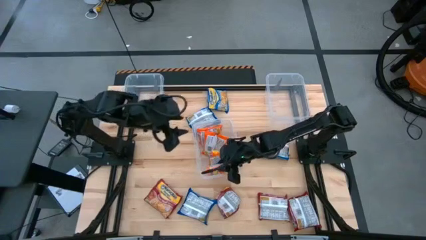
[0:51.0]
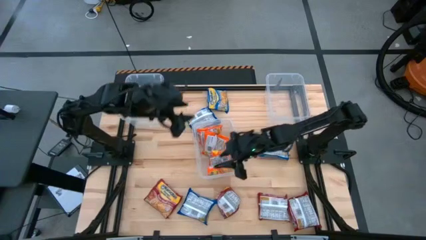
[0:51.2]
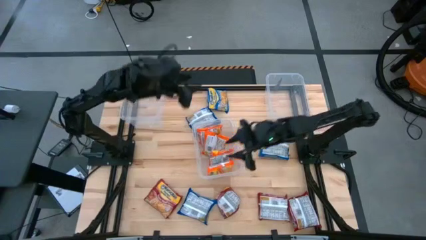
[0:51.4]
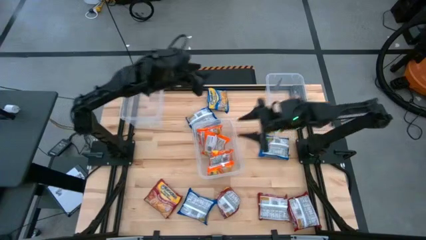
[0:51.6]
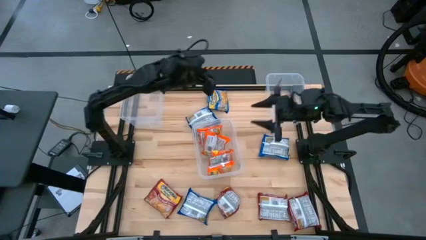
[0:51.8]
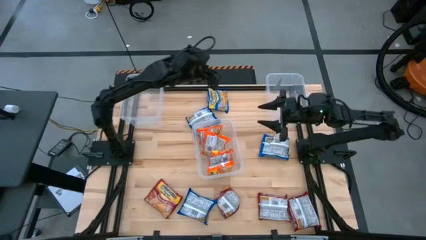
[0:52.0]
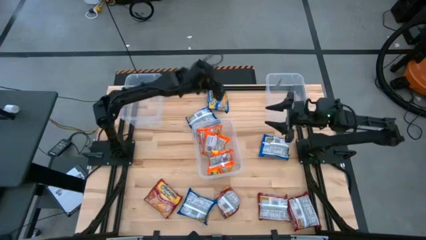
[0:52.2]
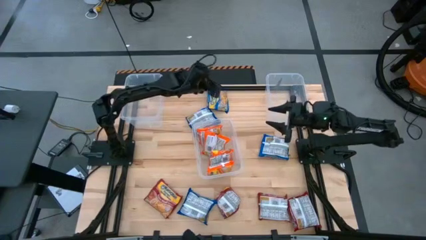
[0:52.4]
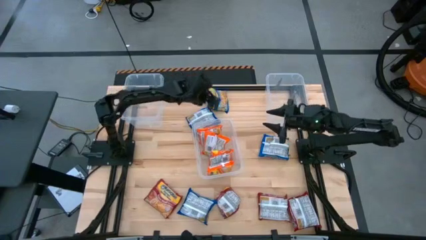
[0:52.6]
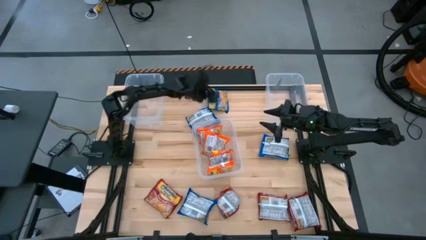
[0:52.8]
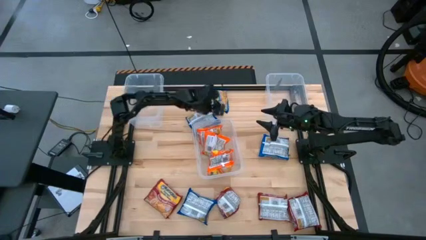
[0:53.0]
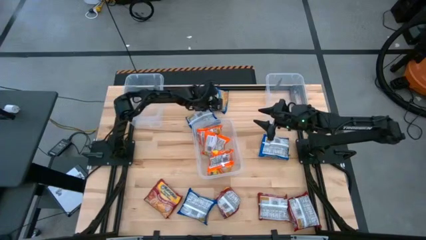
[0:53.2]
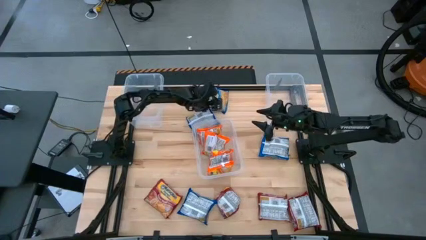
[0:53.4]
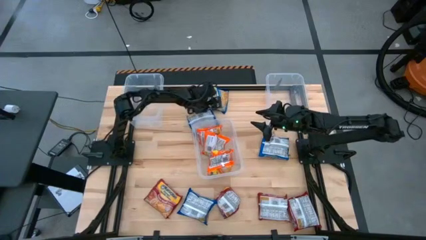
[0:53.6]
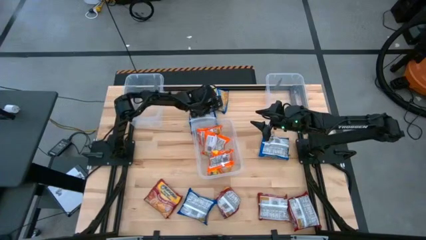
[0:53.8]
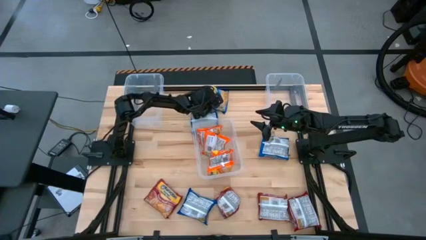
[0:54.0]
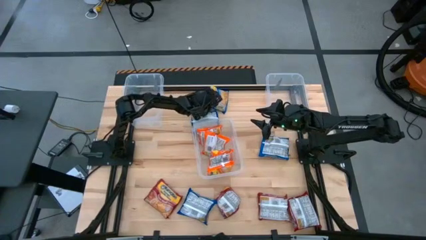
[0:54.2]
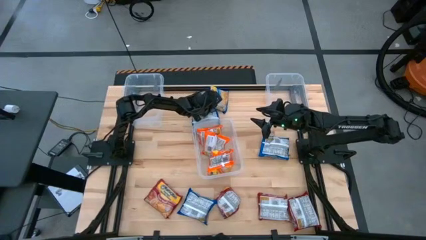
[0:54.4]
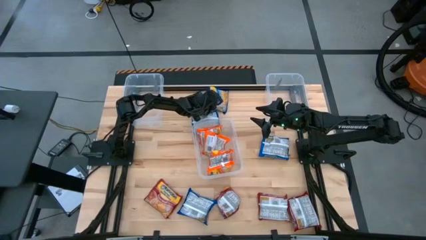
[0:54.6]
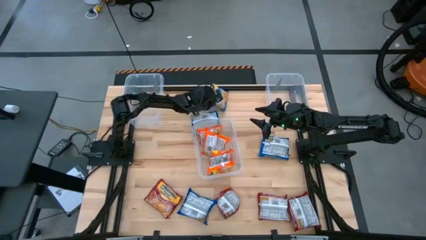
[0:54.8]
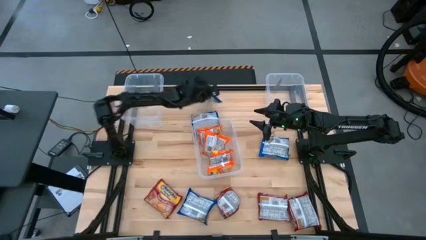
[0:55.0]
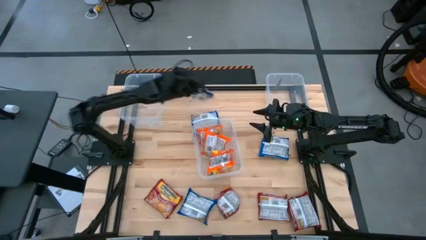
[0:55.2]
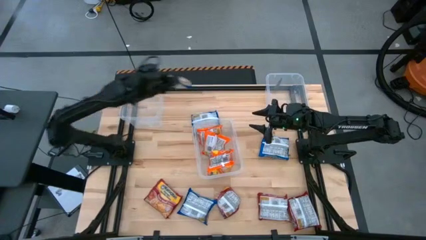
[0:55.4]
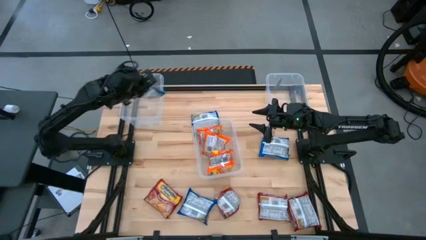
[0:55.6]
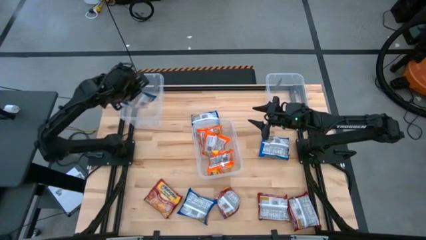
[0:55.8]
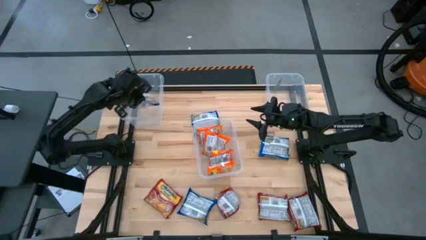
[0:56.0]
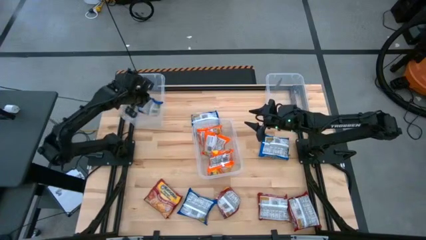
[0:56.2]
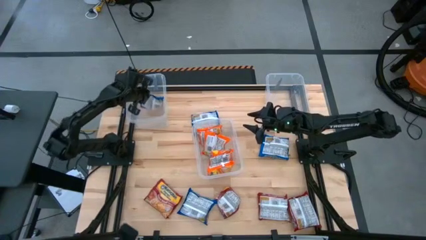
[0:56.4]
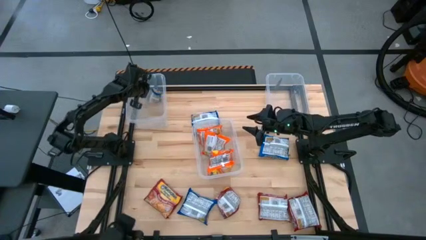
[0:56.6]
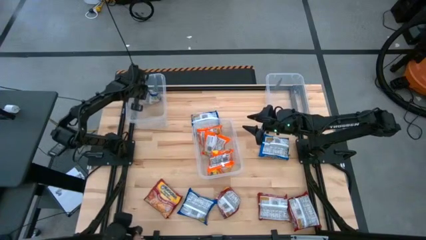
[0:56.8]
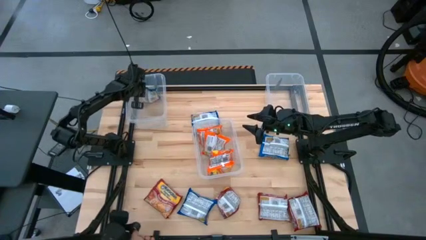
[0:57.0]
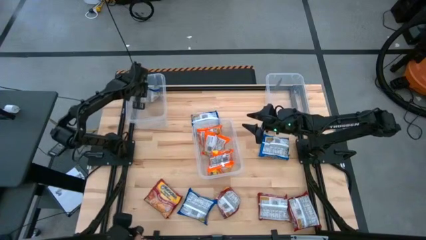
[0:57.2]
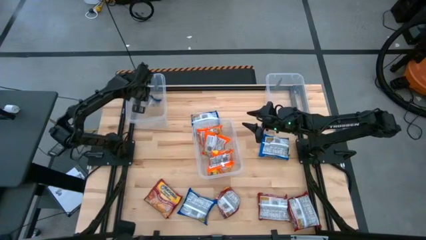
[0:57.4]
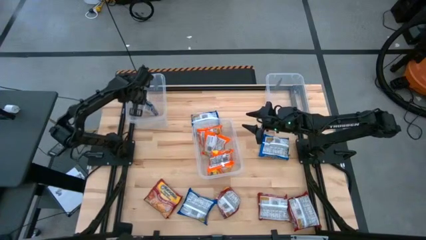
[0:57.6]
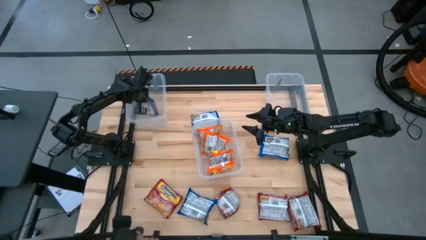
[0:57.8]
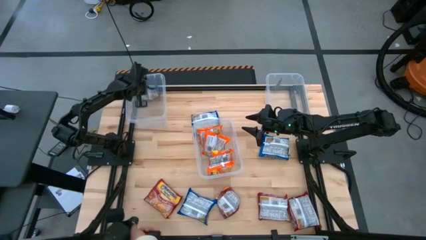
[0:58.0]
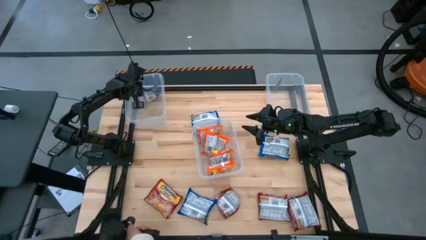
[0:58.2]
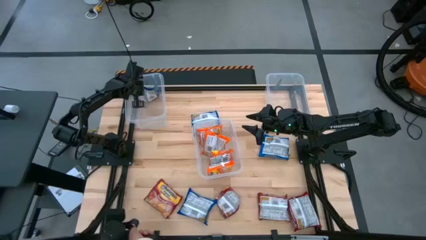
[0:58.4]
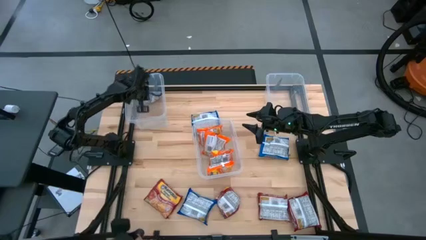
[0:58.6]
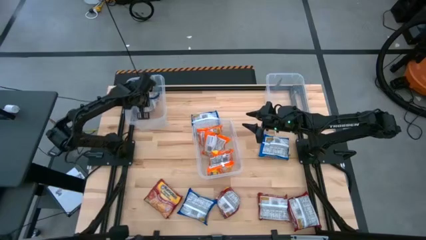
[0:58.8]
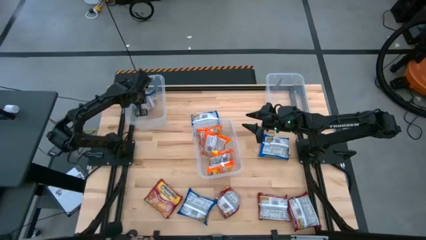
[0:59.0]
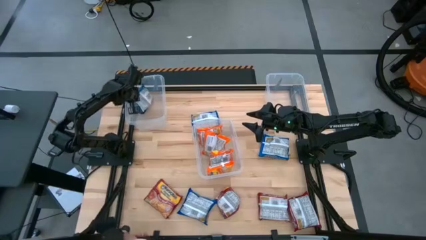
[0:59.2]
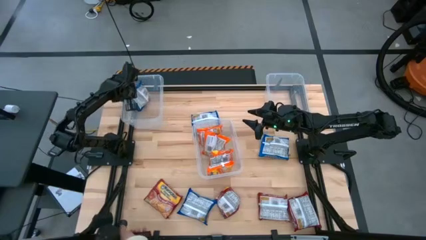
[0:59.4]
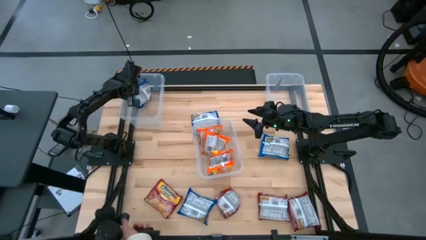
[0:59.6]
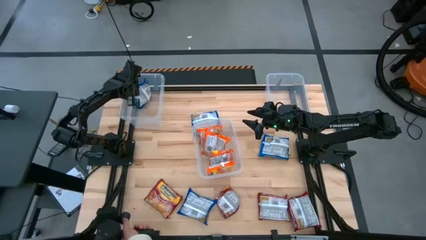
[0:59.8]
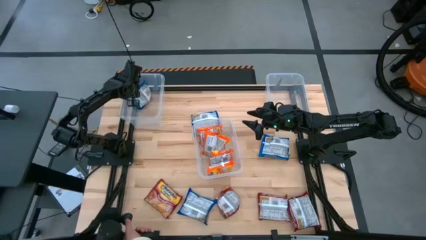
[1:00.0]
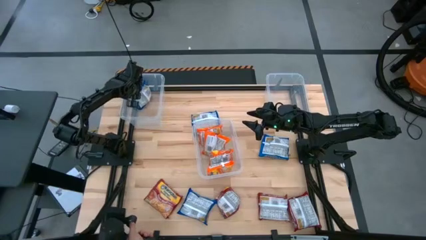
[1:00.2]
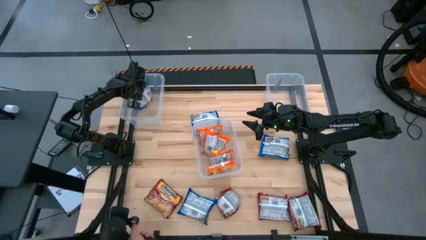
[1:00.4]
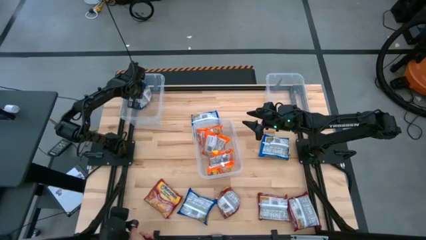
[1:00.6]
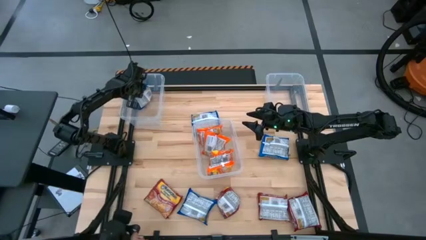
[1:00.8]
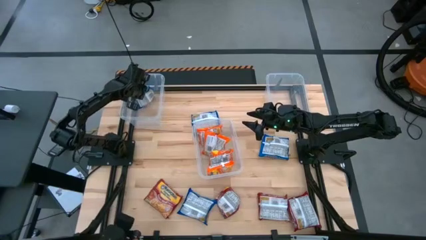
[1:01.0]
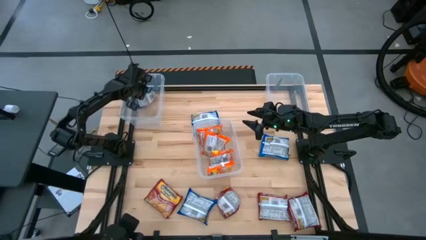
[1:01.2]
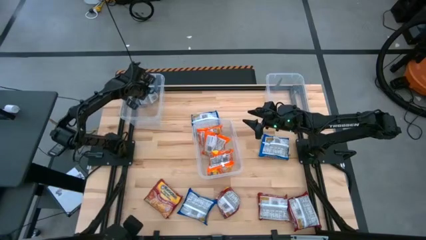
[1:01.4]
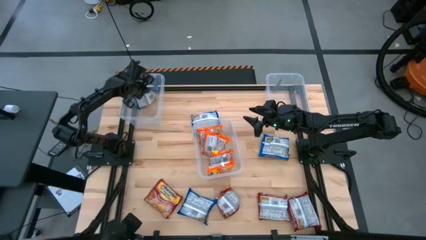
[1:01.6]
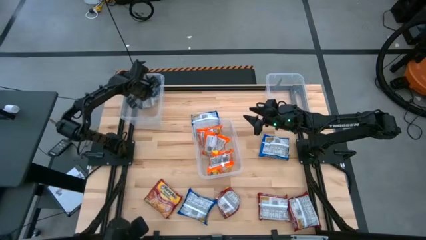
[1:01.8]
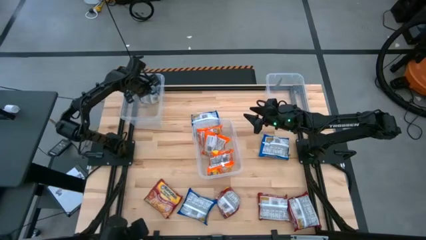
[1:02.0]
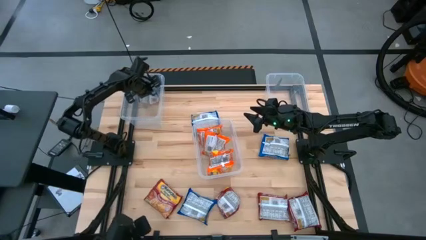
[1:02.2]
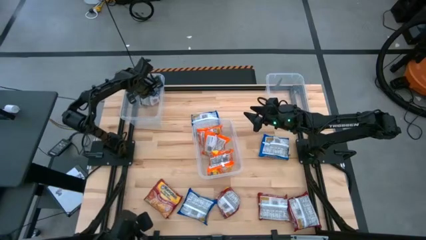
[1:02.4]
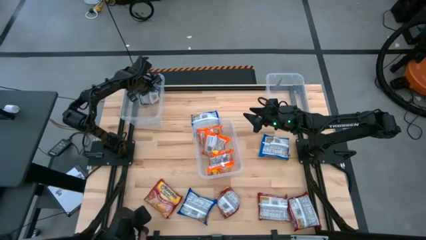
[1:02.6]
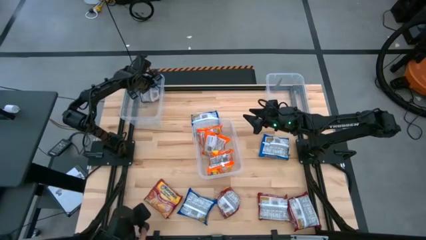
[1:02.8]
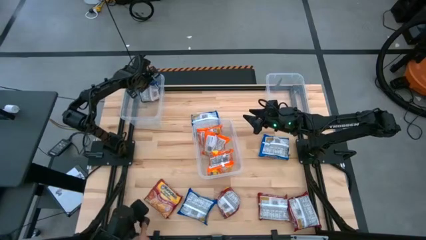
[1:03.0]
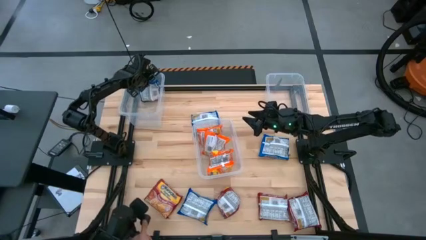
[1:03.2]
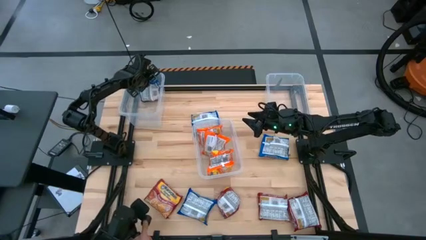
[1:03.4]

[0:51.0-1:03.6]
Task: Sort Maruchan noodles
Put the blue noodle pack into the left transparent bin

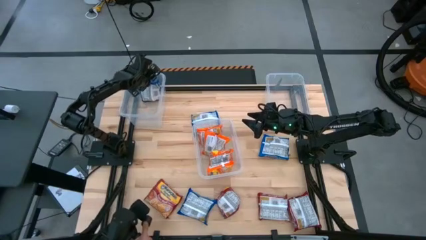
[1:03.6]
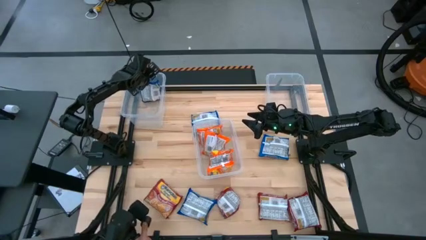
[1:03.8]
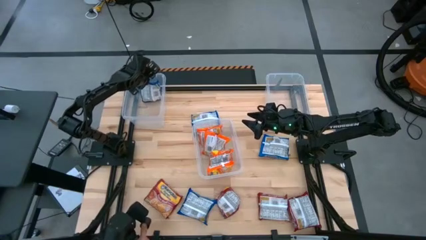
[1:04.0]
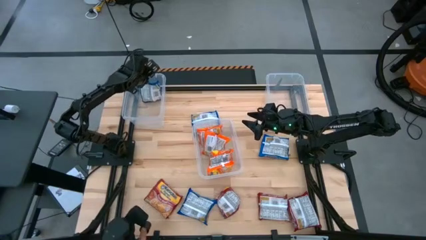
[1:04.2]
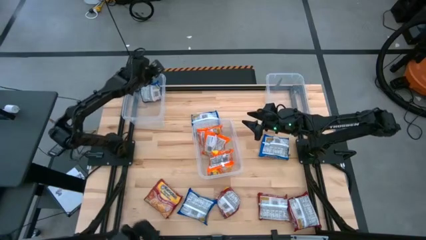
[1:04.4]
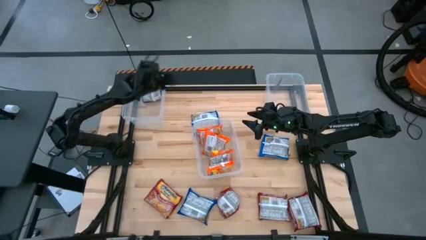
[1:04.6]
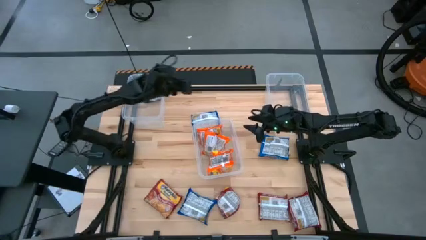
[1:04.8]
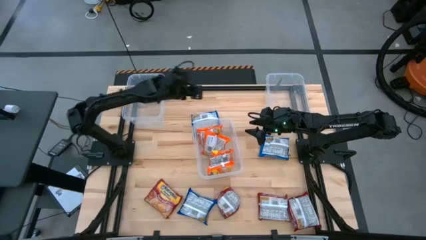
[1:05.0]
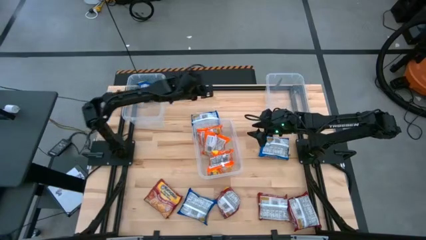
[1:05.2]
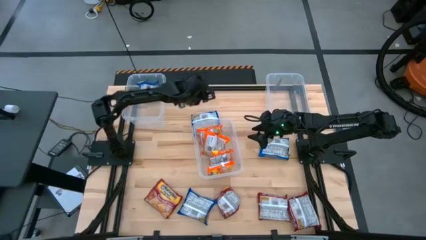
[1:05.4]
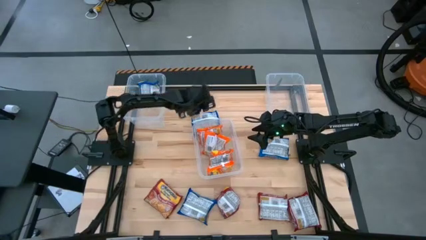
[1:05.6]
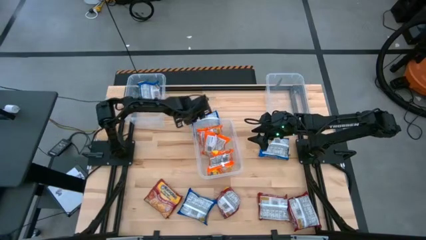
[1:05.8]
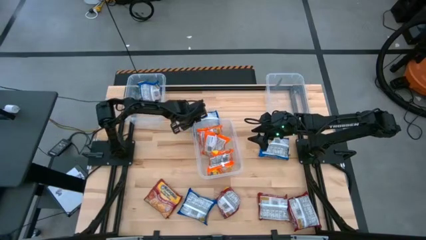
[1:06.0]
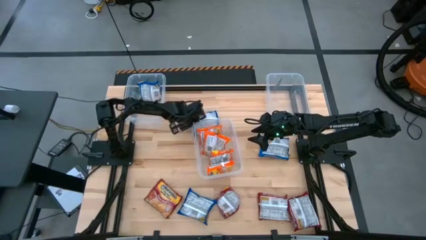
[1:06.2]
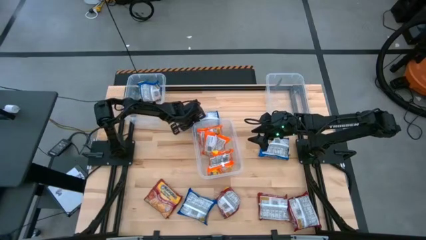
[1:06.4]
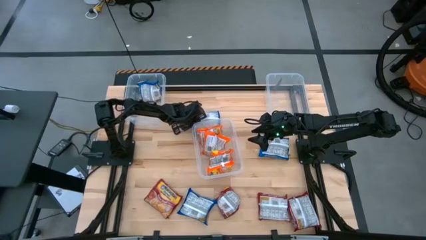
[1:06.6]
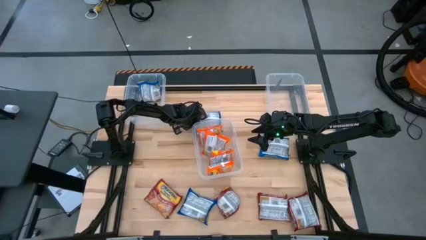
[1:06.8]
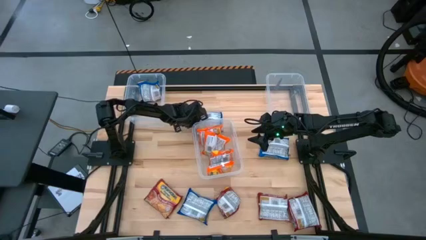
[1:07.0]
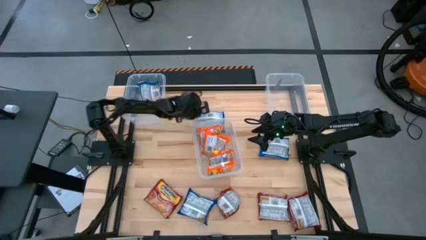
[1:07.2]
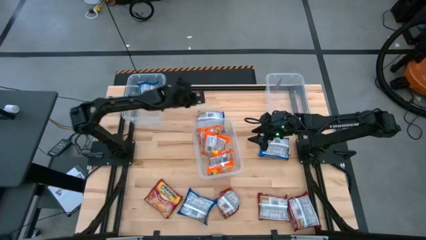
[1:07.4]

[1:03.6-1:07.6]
Put the blue noodle pack into the left transparent bin
